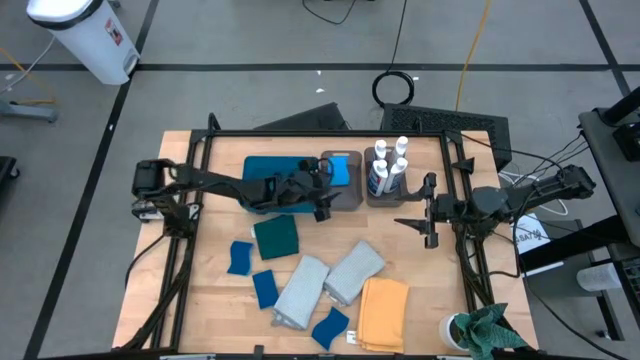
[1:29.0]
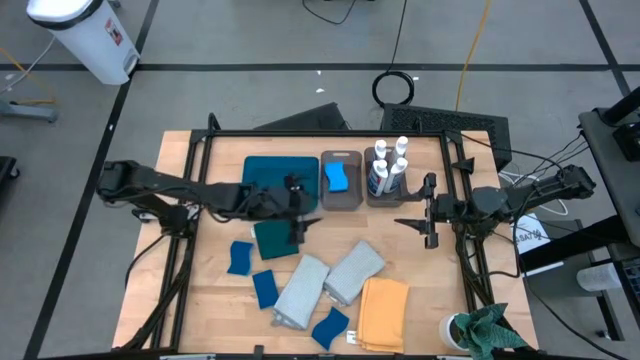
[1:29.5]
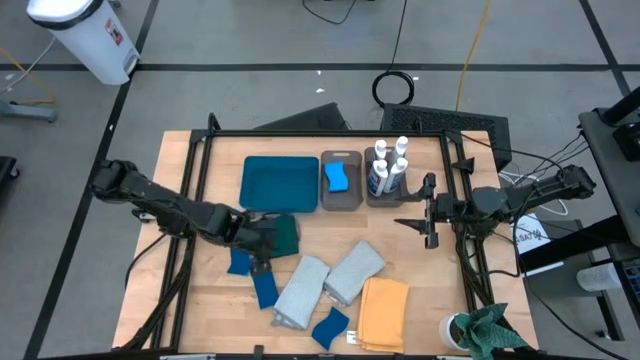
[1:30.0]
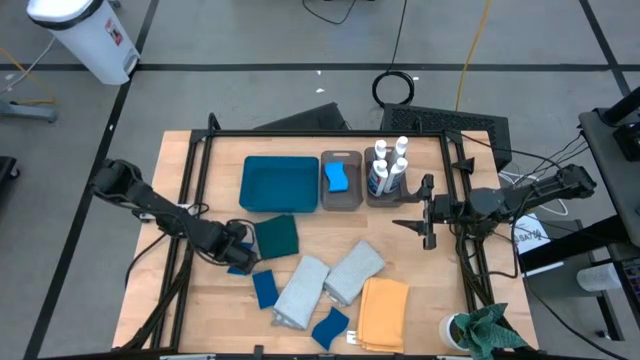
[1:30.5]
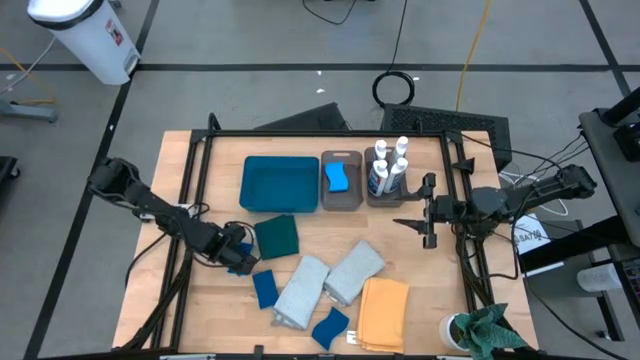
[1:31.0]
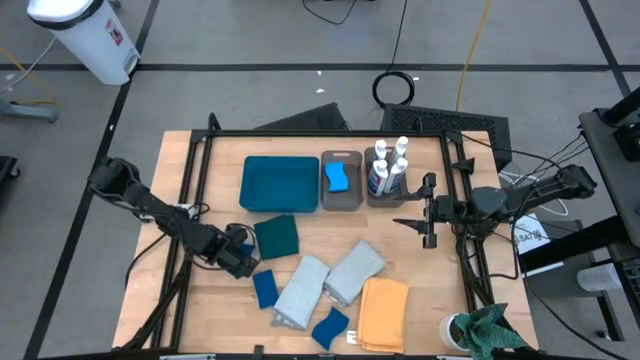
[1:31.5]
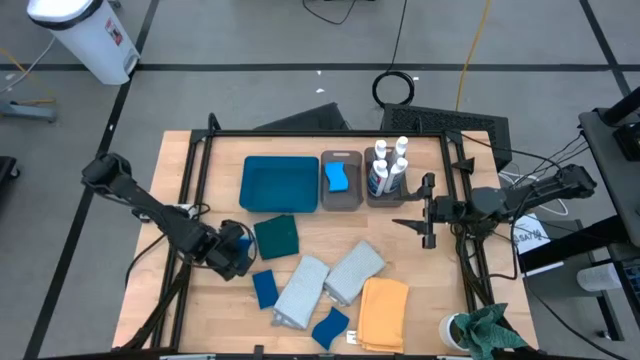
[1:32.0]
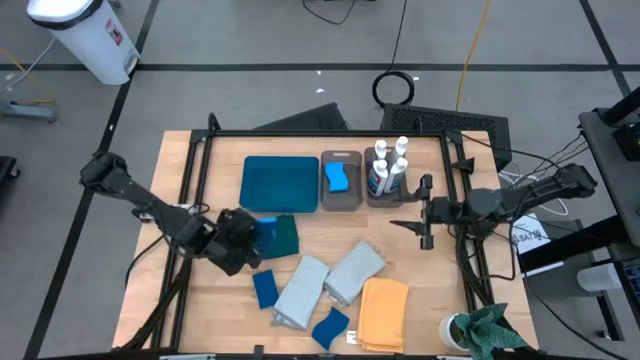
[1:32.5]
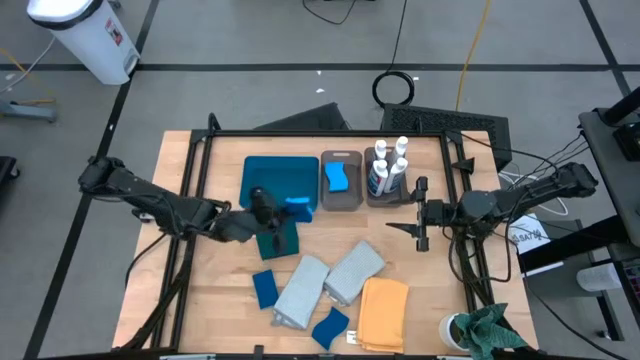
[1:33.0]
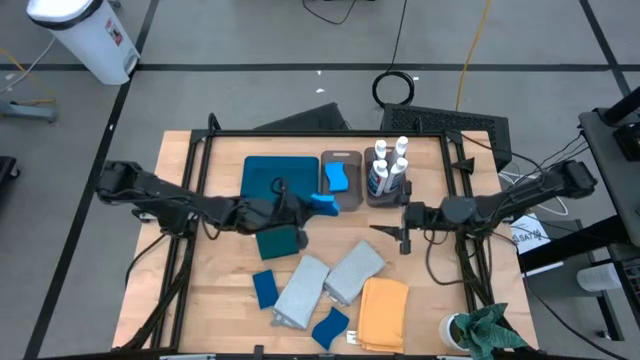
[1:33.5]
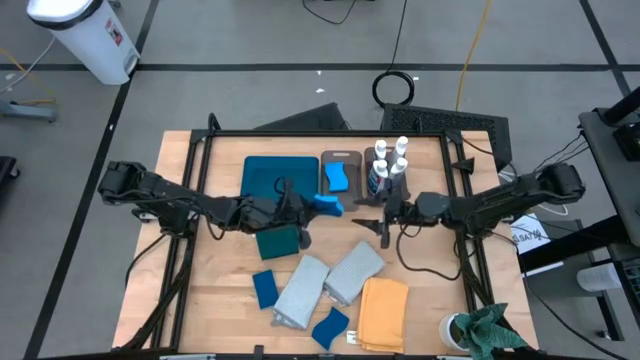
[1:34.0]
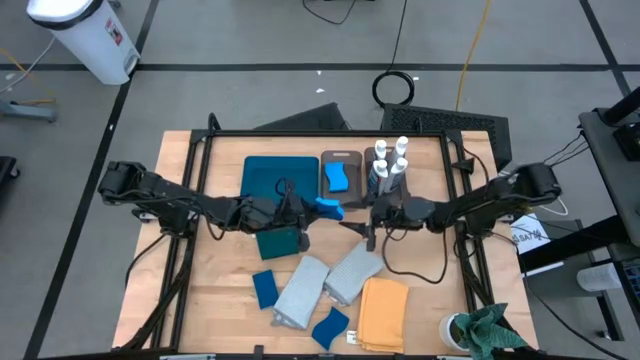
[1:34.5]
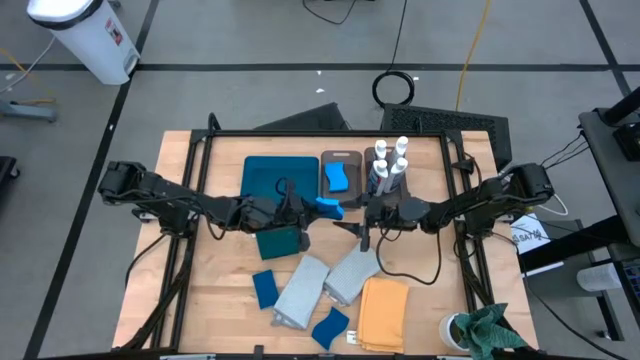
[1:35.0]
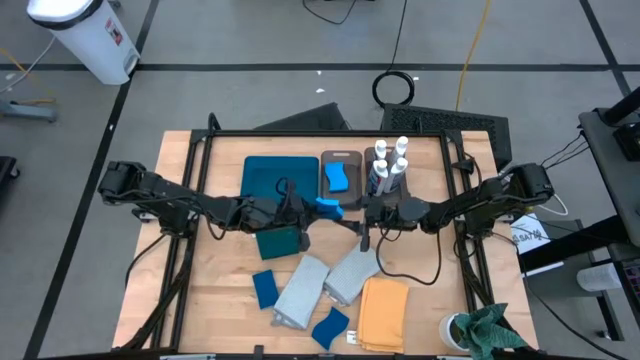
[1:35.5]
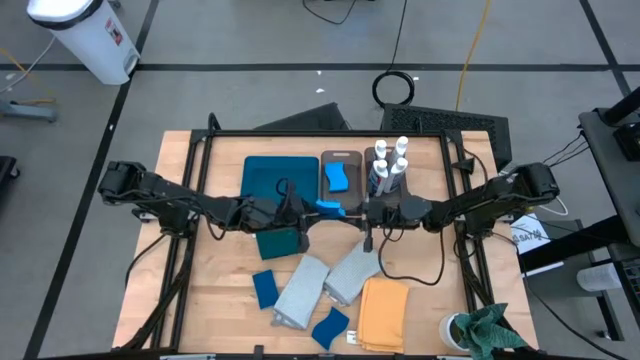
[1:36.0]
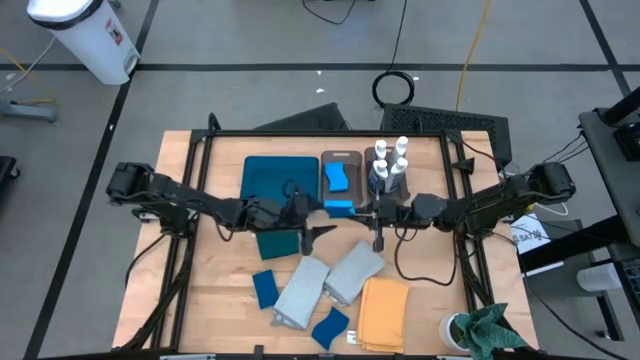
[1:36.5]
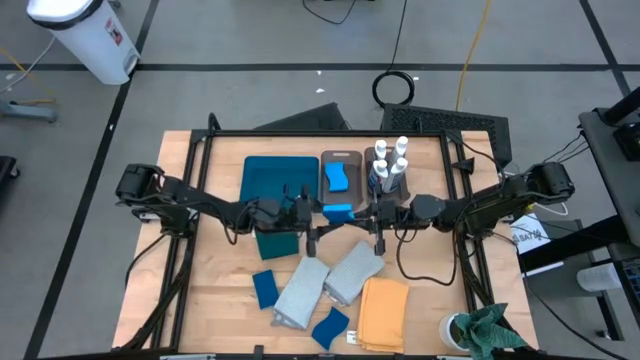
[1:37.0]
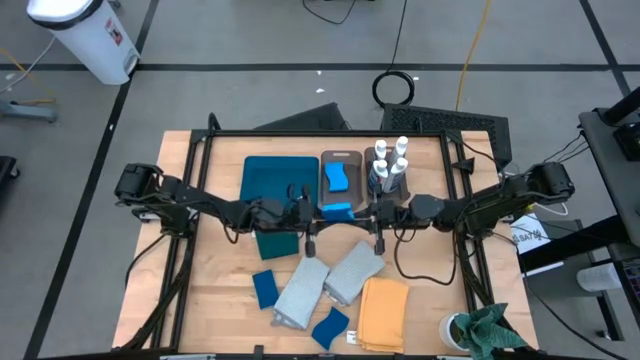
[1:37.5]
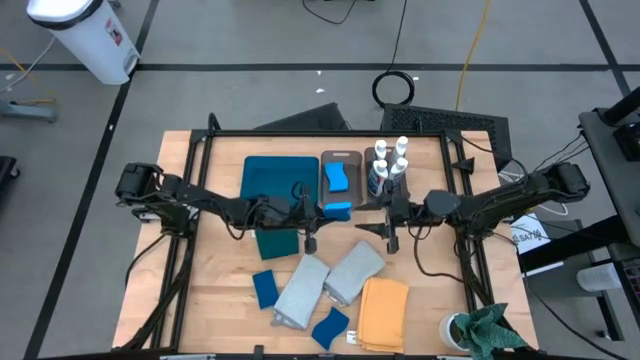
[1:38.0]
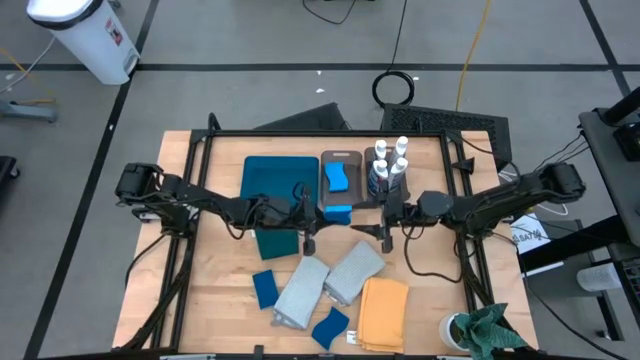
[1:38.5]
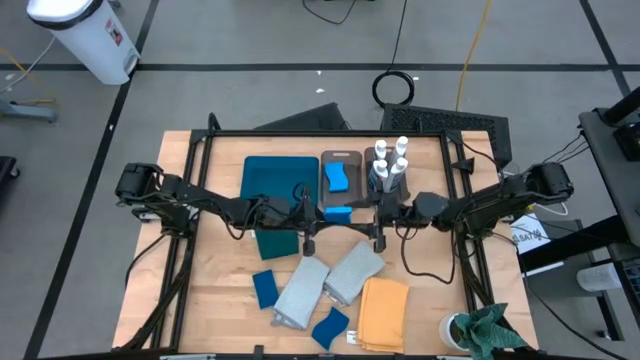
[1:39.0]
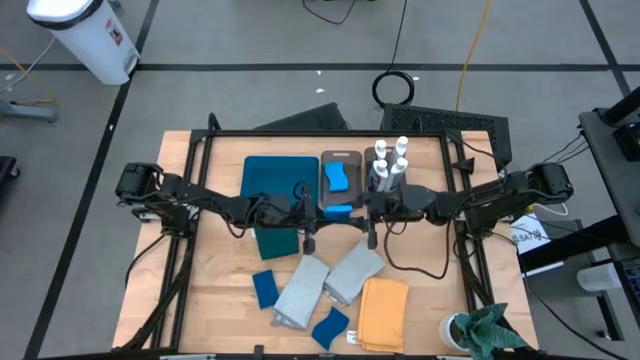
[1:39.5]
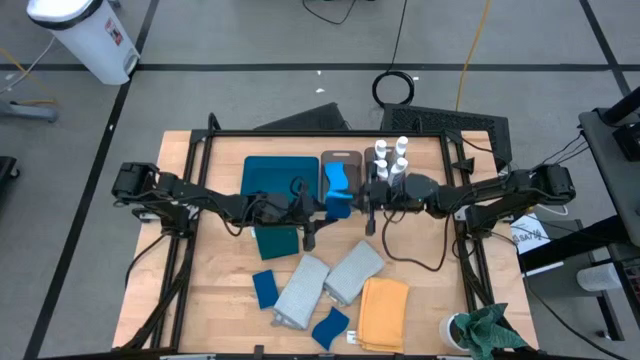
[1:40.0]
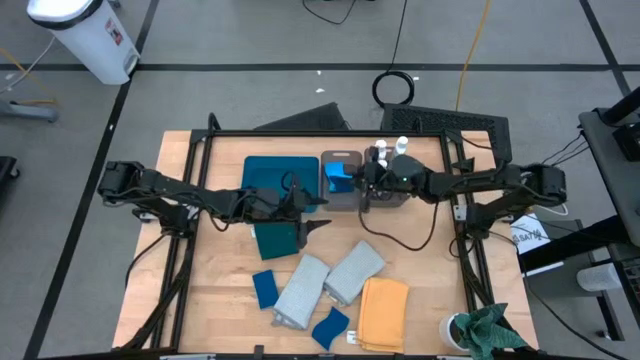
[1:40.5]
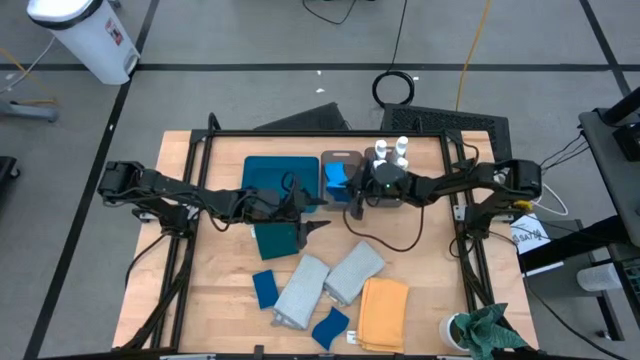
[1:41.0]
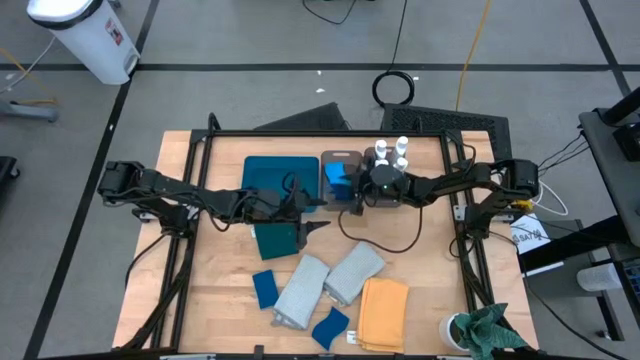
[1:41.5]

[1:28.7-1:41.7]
Task: Pick & Place Kitchen Items
Put the blue sponge into the left black bin

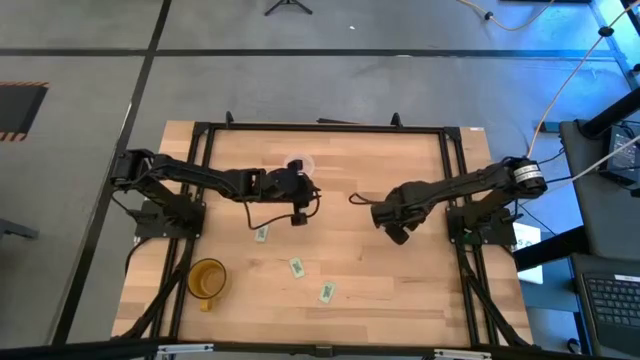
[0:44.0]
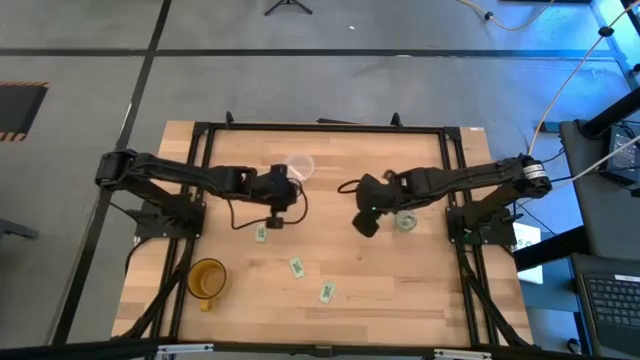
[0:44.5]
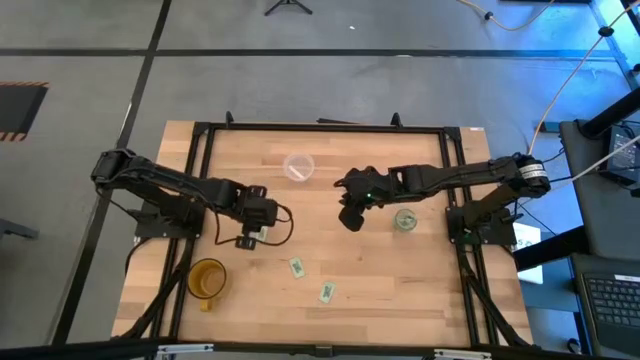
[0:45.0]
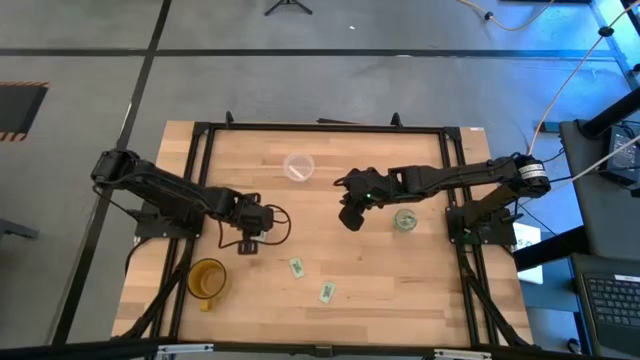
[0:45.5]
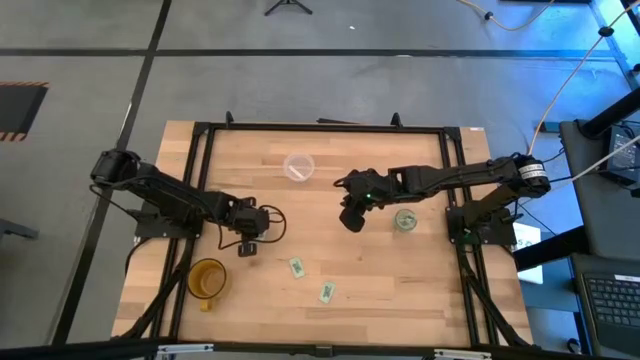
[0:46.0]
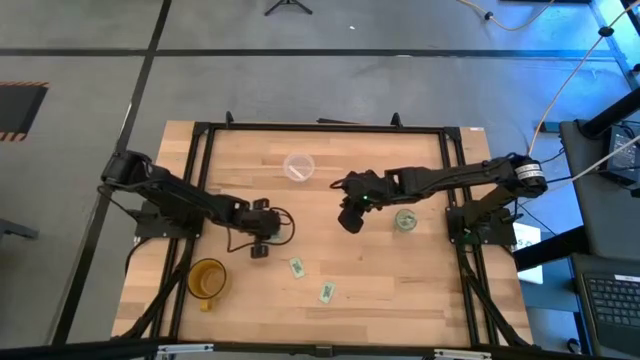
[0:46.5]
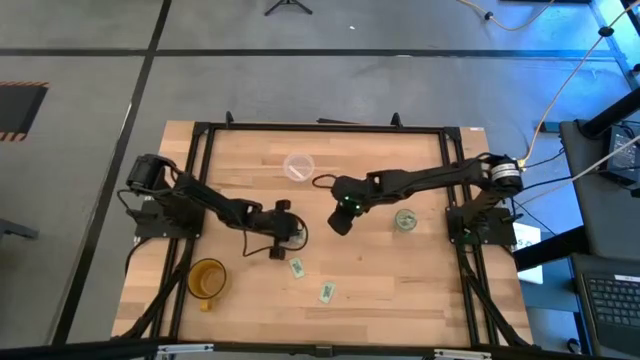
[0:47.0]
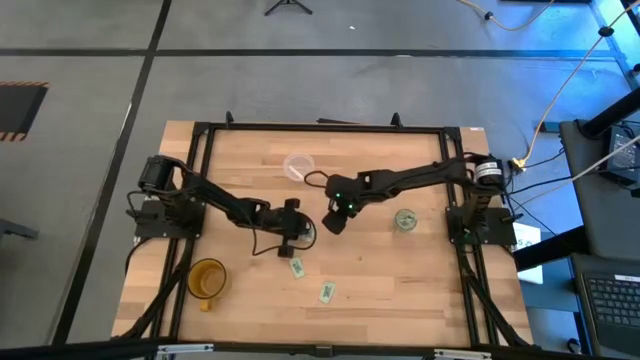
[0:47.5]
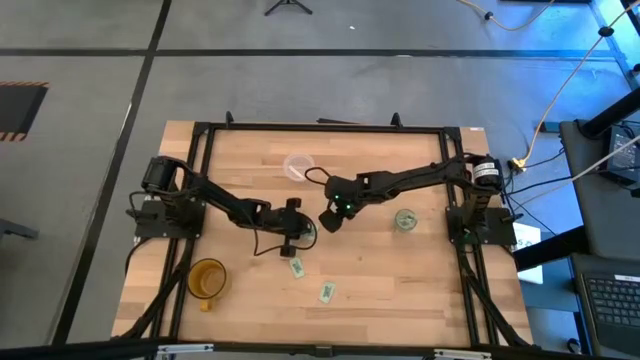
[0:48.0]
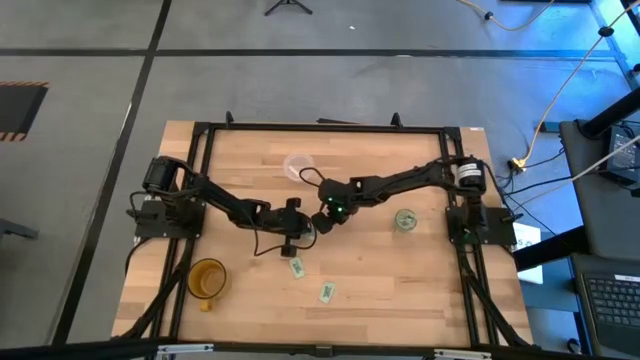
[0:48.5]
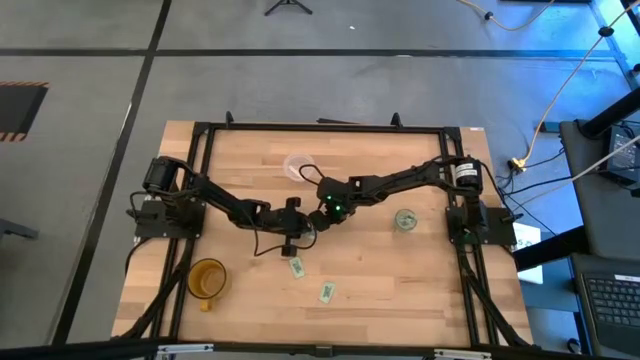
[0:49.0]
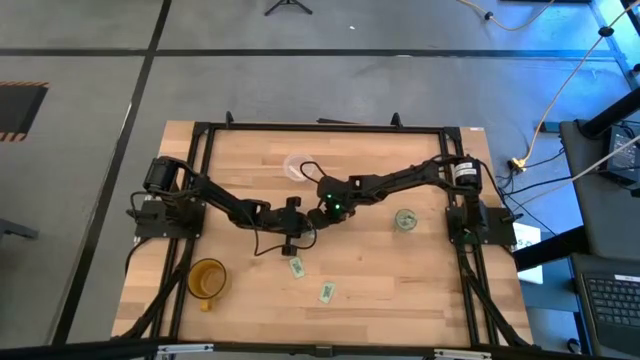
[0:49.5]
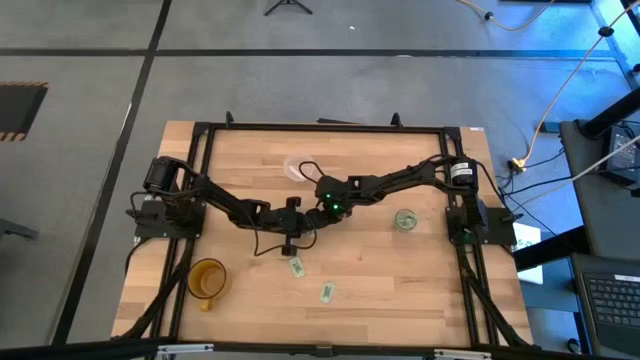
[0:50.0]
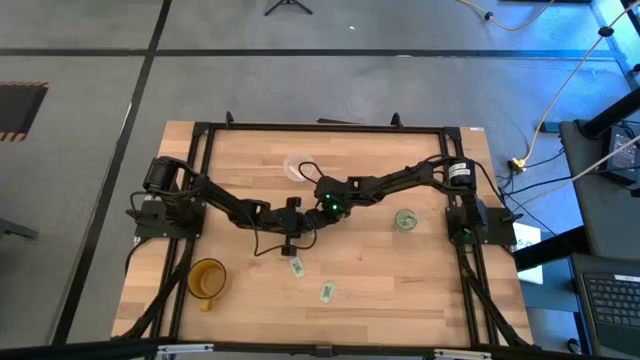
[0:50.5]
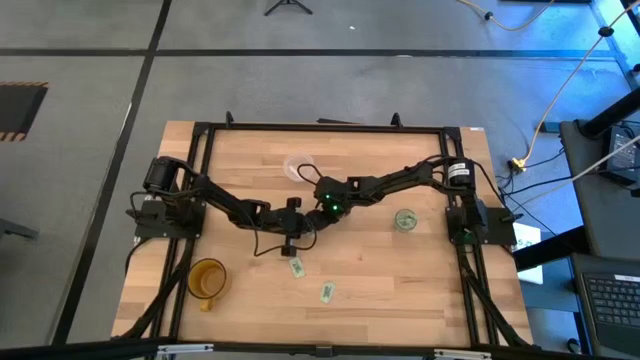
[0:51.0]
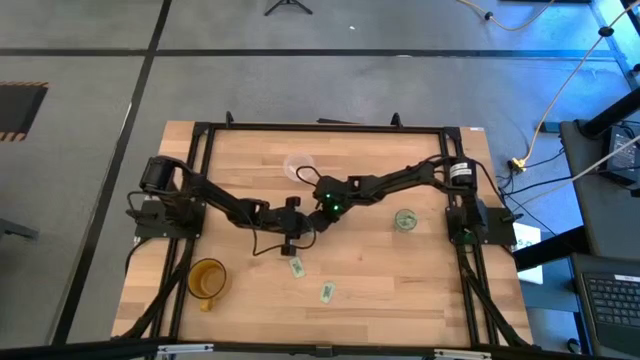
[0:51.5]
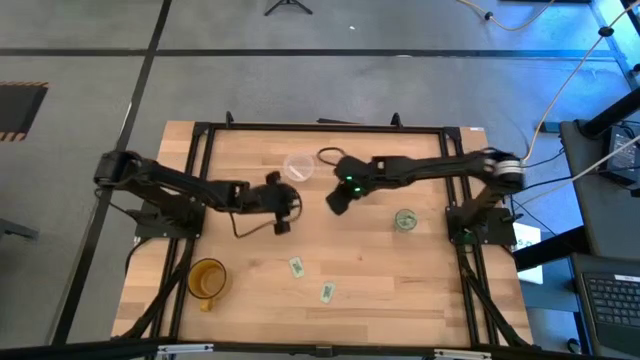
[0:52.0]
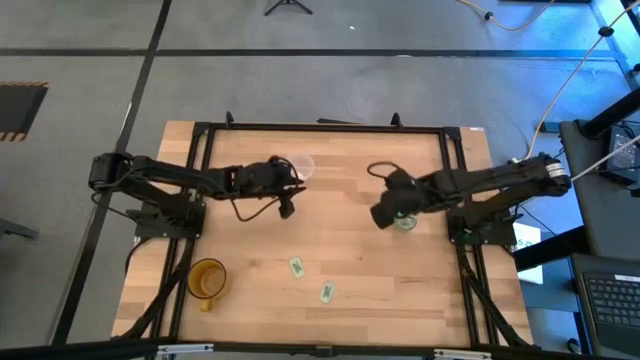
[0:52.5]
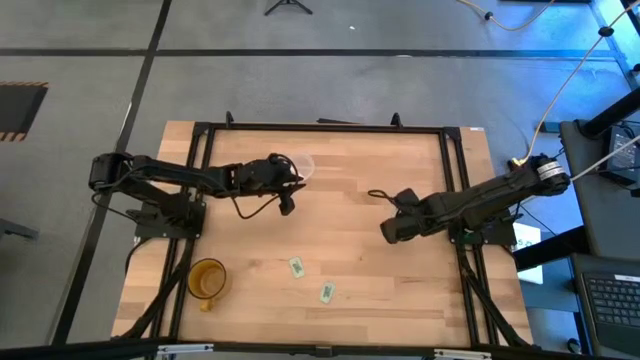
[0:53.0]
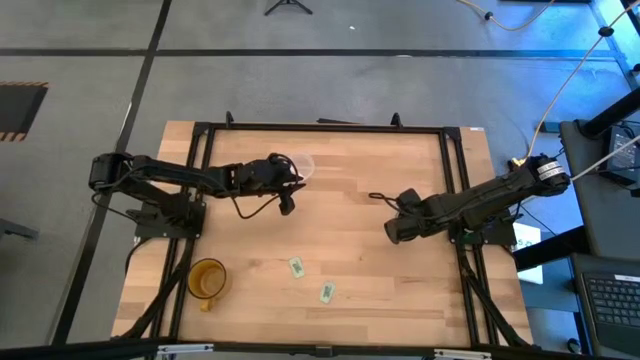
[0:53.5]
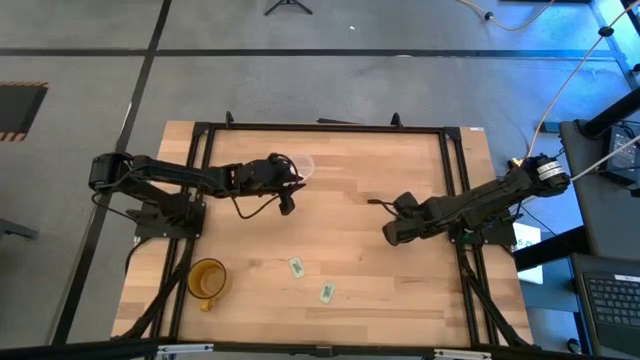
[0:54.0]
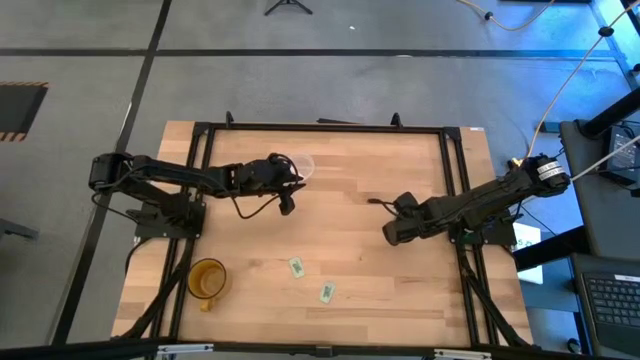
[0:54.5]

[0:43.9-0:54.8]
Task: Pick and place Stevia / Truvia into bins
Put the stevia packet into the transparent container
